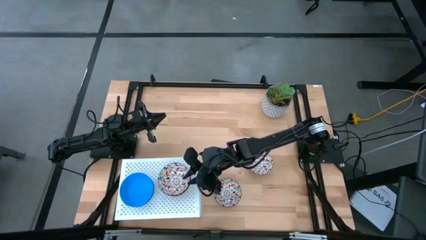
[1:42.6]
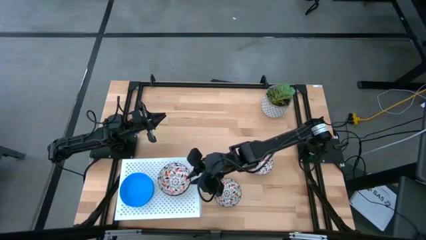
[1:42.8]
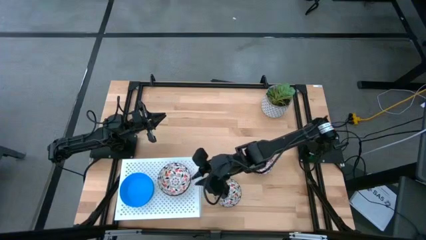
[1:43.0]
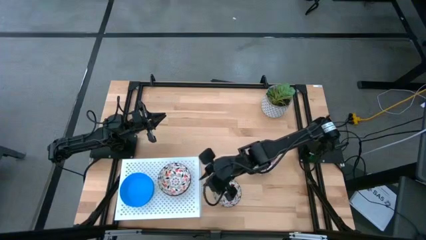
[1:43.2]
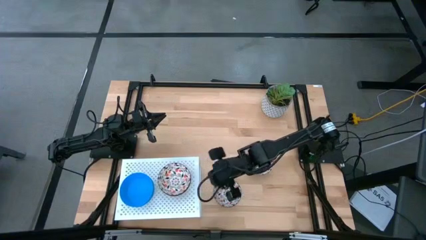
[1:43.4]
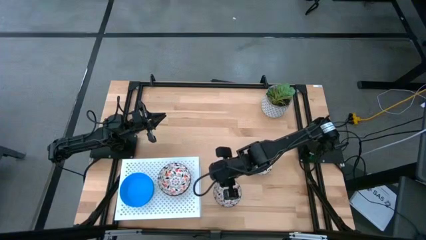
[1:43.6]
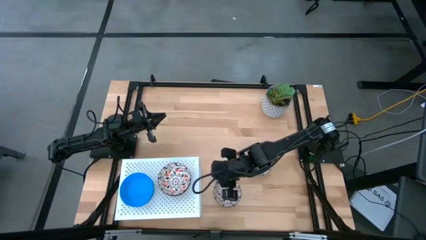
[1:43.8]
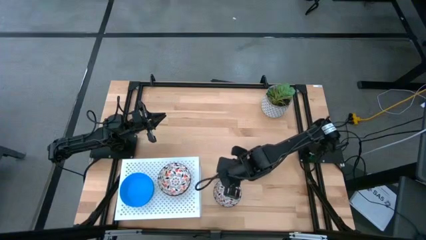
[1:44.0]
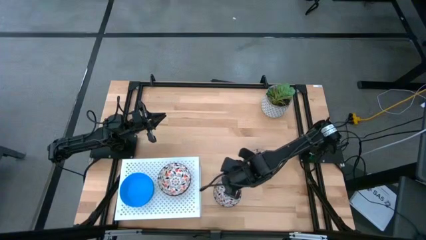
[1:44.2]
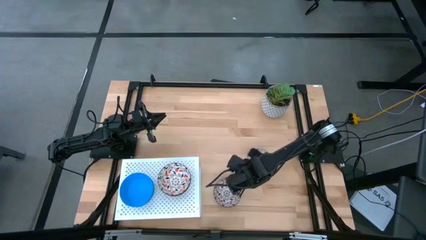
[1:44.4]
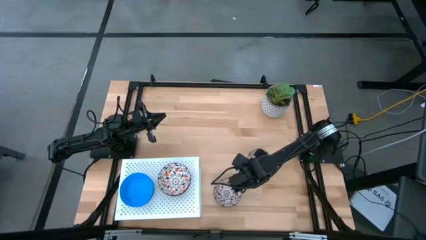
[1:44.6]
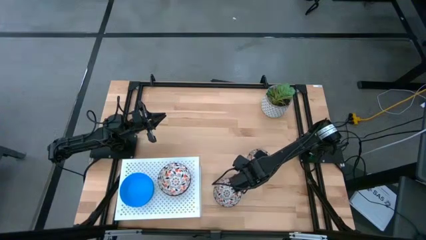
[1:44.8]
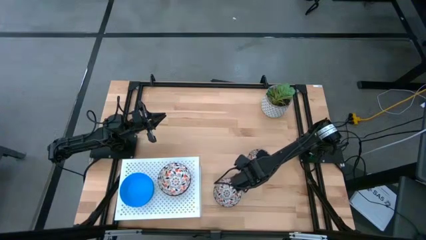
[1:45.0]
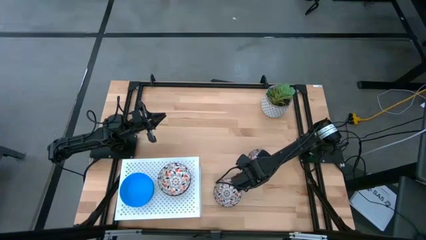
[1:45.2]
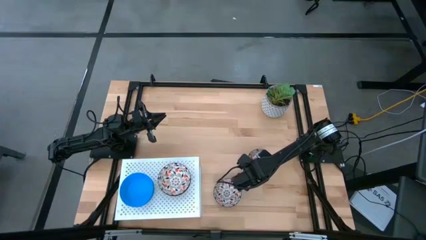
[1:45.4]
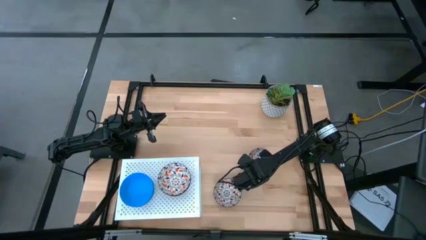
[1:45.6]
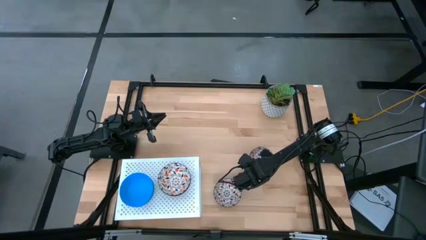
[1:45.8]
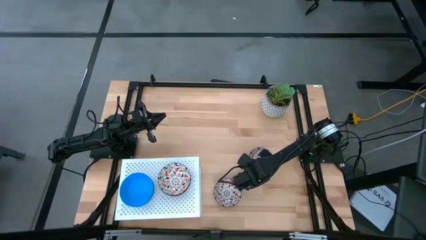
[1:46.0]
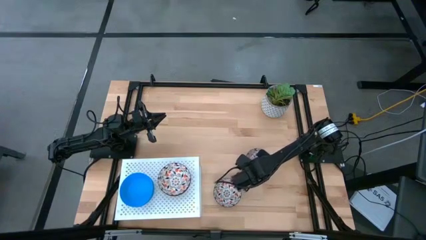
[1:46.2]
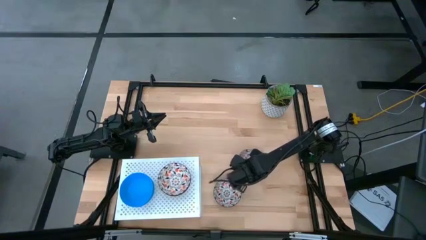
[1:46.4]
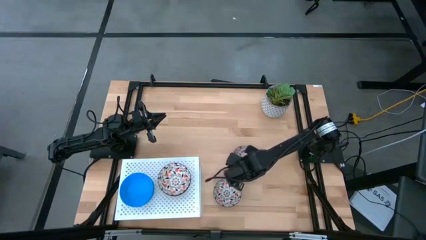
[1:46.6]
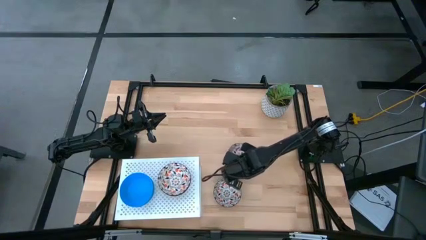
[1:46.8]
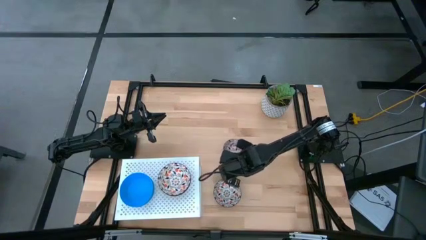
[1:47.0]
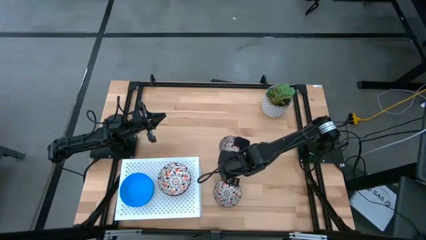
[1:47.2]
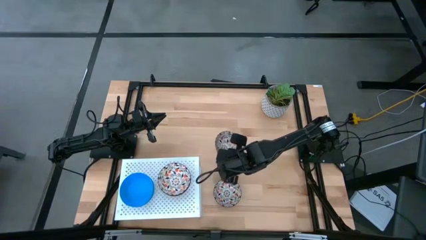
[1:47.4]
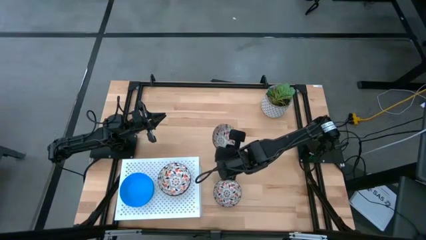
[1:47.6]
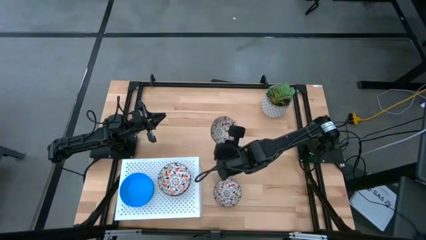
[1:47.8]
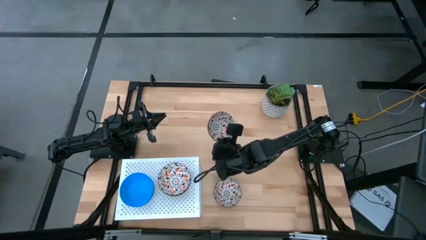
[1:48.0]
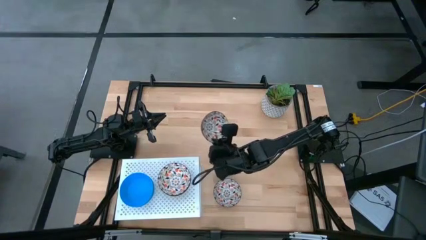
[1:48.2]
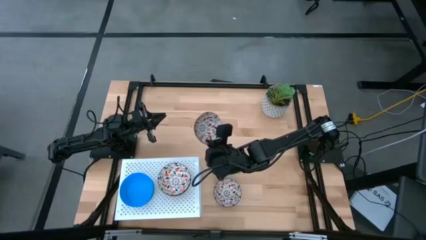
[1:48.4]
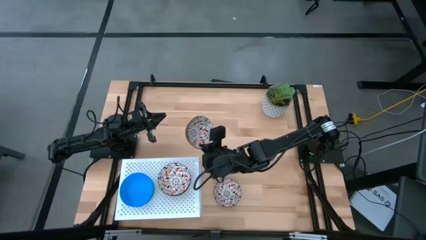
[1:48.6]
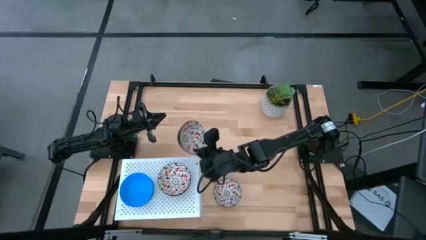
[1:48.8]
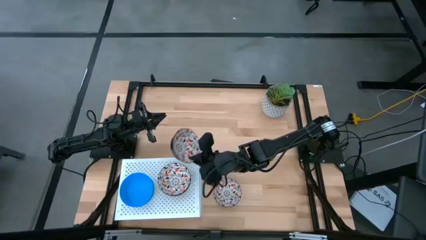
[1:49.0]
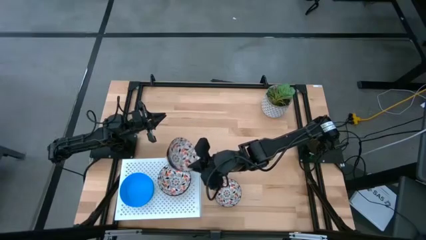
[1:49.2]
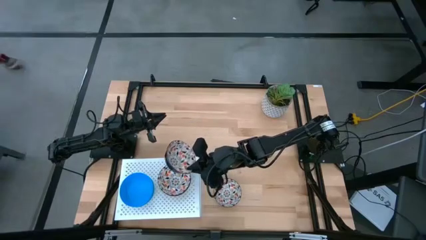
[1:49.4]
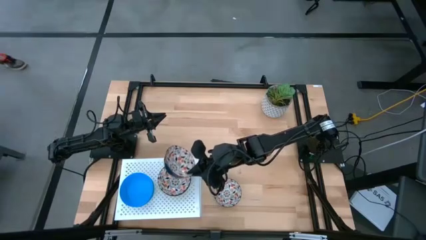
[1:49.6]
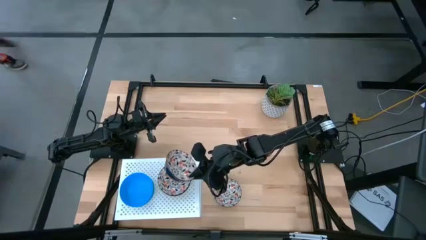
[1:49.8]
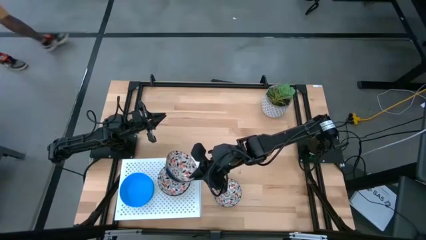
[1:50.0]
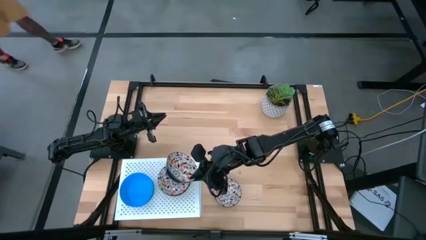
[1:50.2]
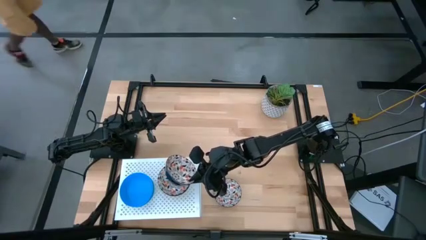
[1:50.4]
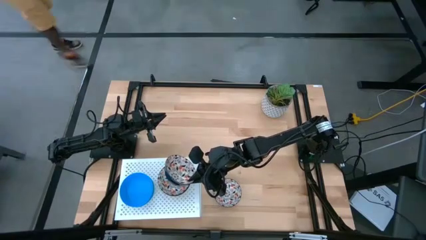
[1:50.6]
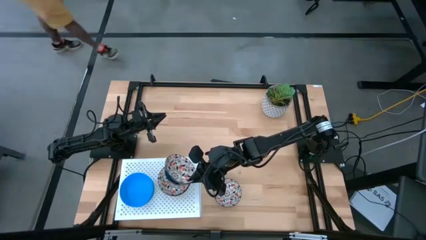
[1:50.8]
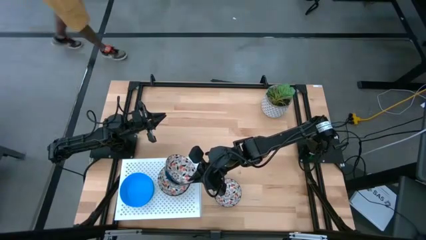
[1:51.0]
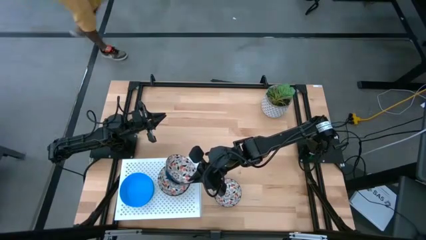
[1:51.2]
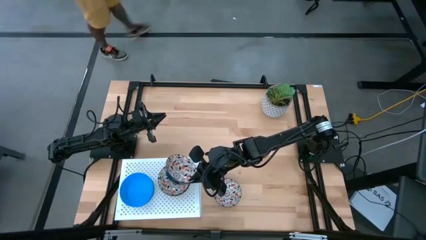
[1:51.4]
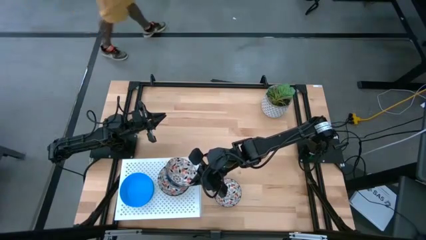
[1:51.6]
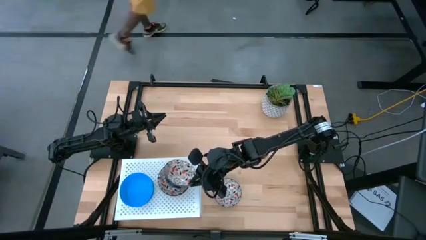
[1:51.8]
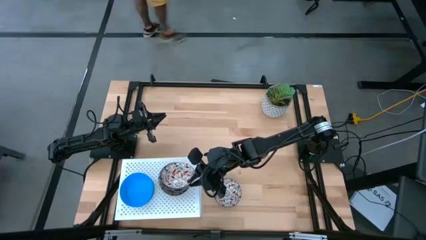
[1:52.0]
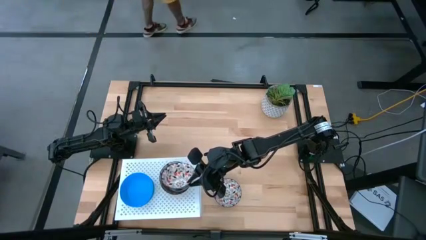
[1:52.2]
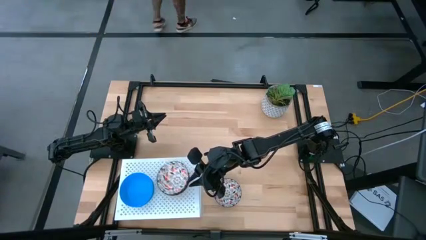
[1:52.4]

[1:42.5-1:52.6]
Task: Pick & Place Mini bowls
Stack the orange patterned bowl on top of the stacked orange patterned bowls on the shelf
